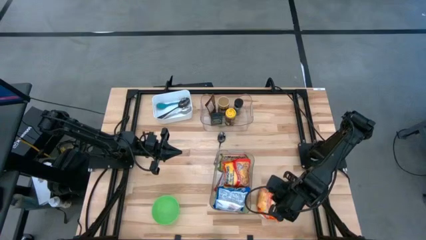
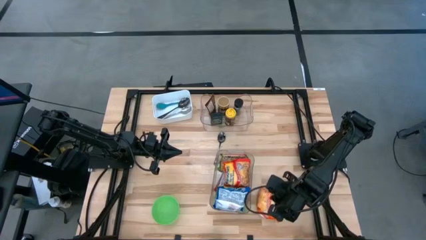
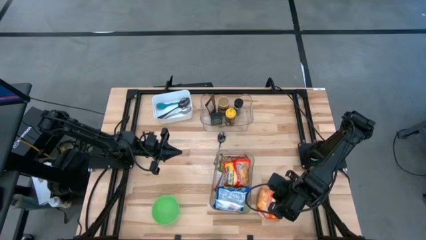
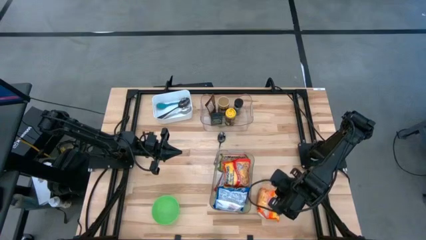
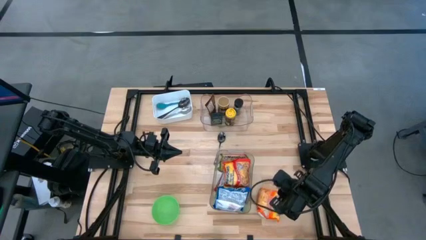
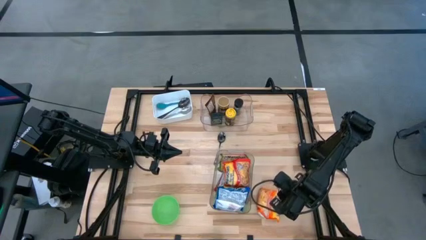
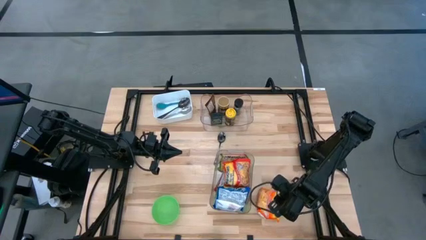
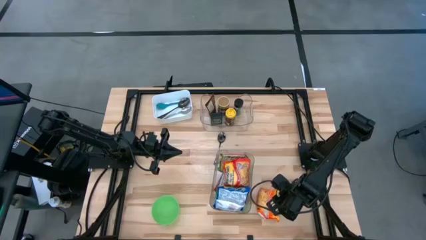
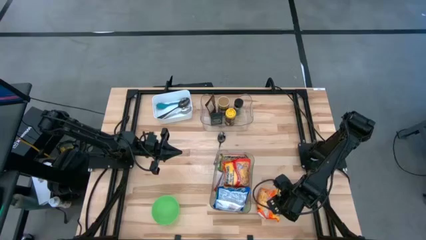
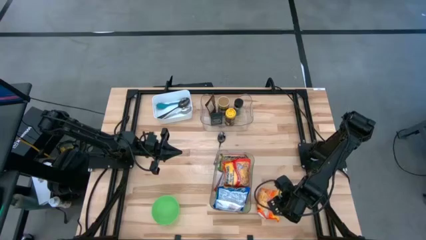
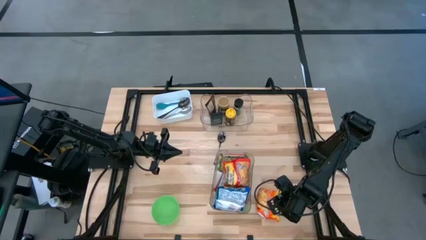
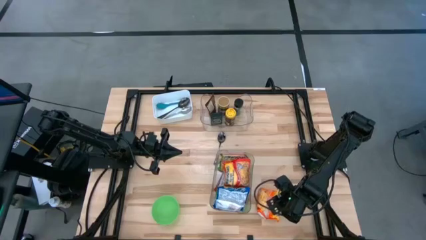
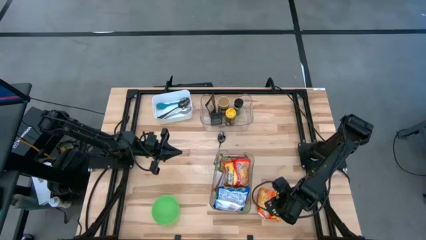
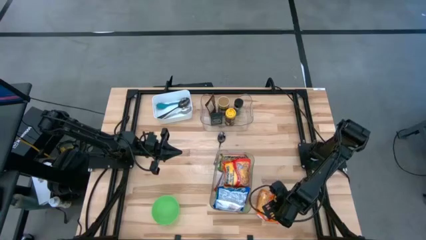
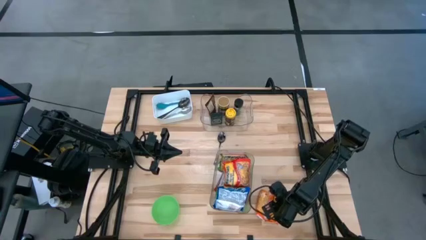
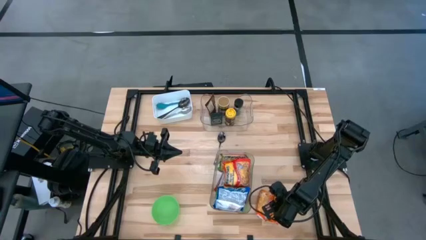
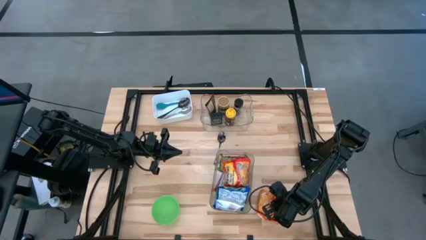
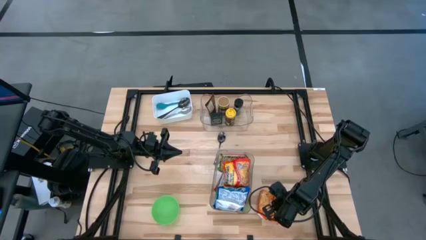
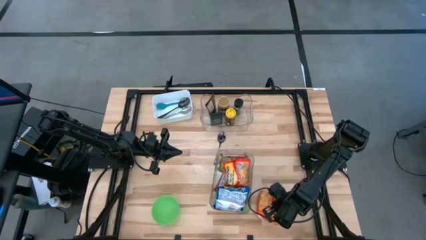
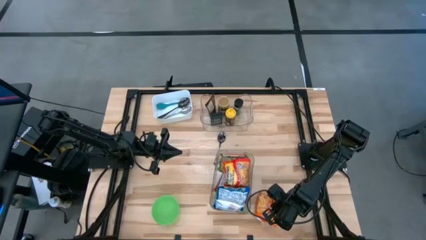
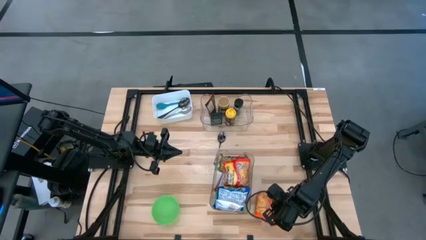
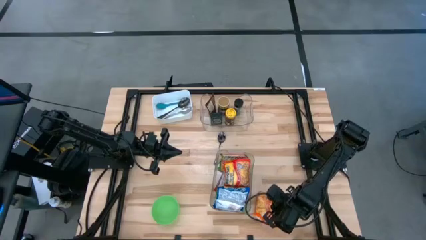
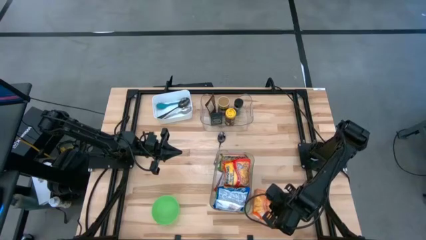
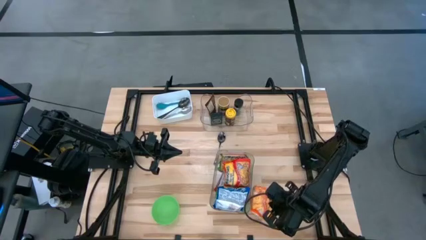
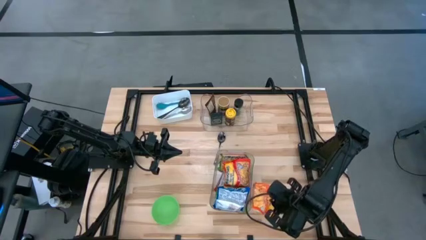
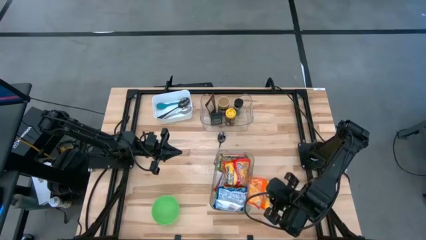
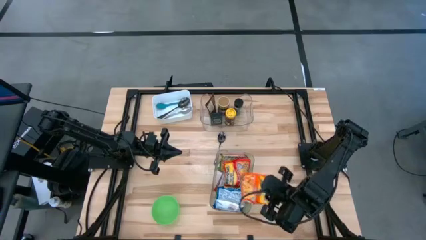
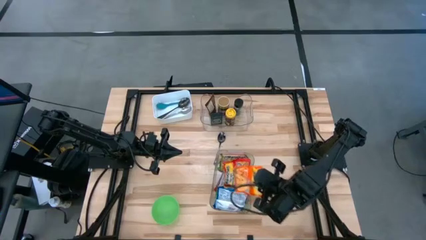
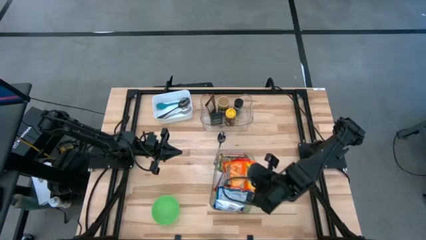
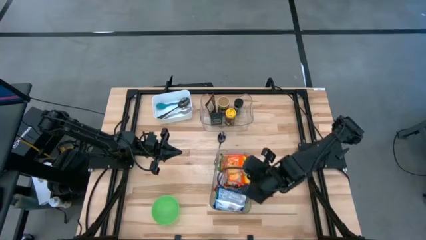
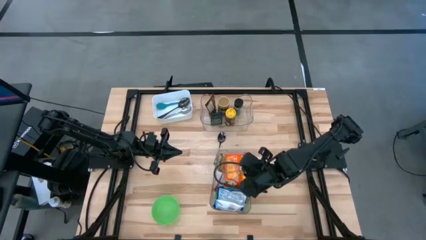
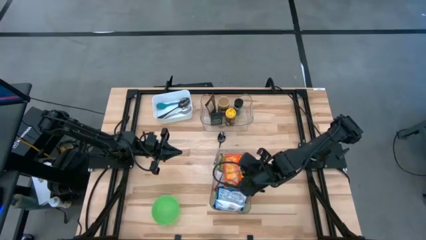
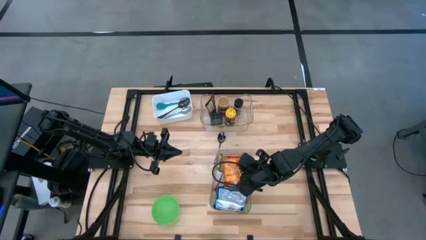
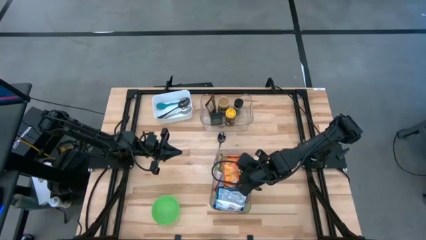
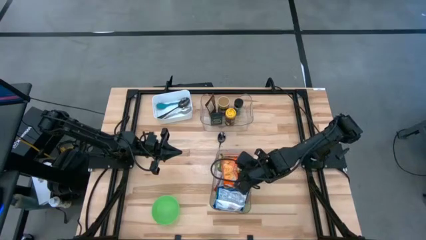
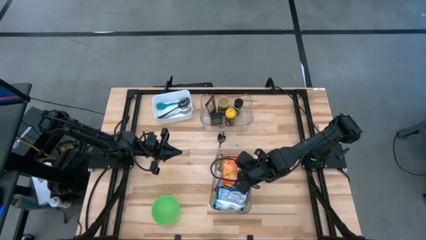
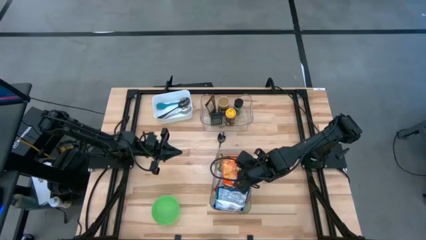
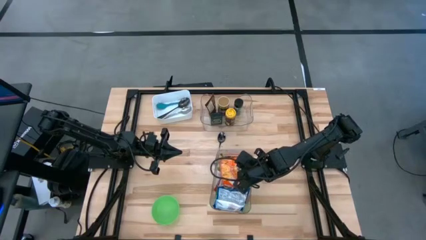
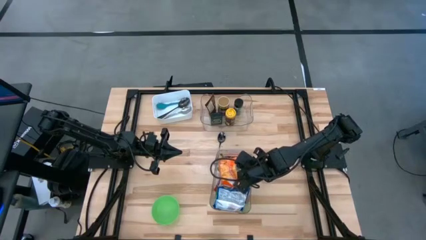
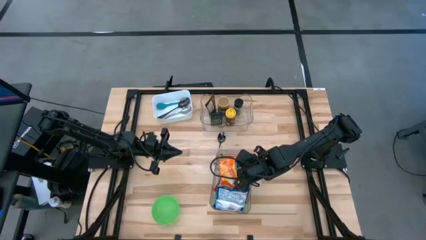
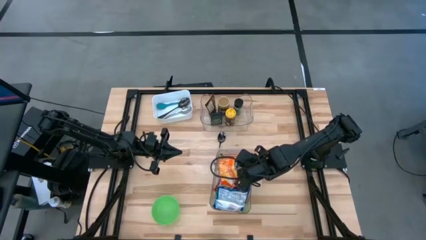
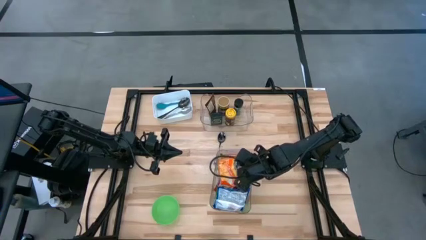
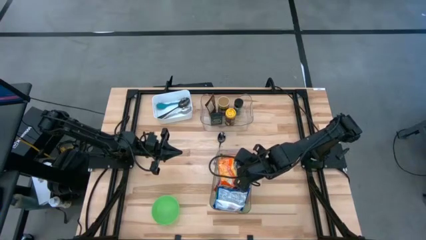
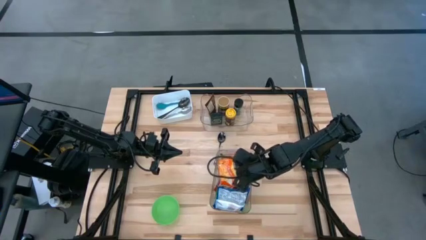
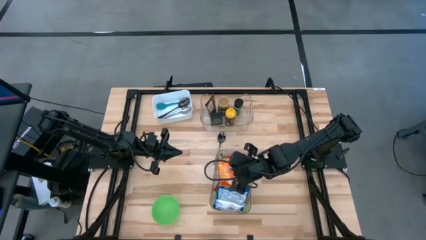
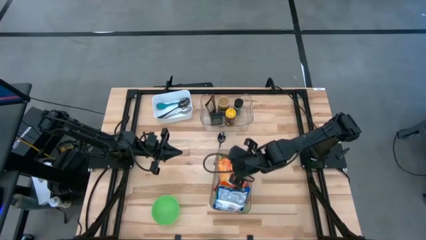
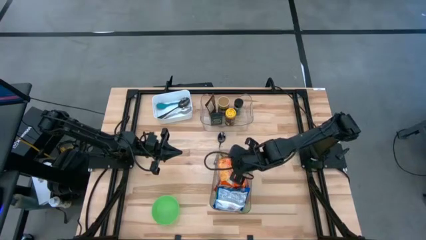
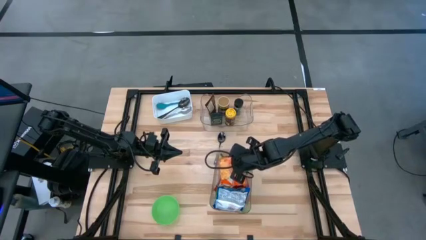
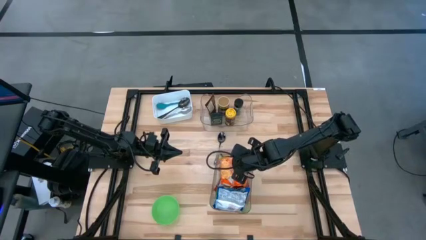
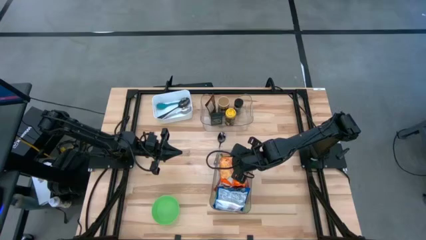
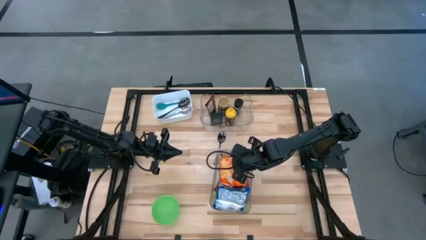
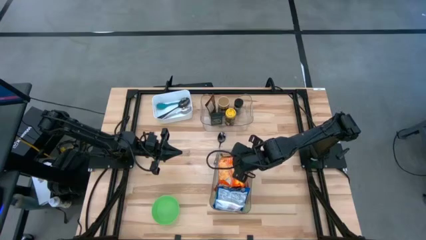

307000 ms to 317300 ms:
Task: Pick & Place Food Item
Put the orange noodle pack into the bottom transparent bin
